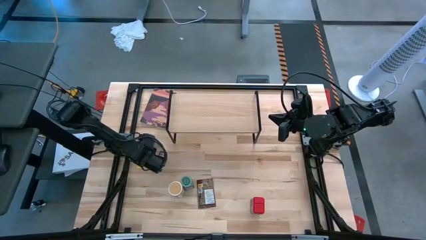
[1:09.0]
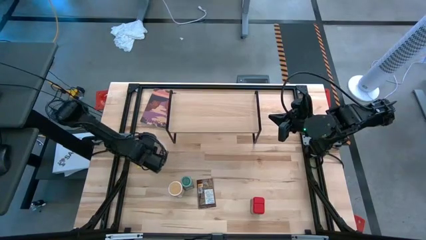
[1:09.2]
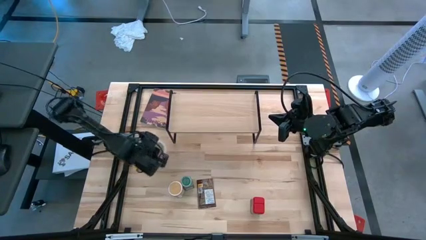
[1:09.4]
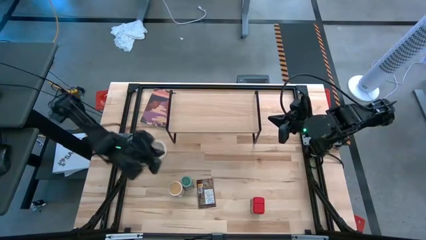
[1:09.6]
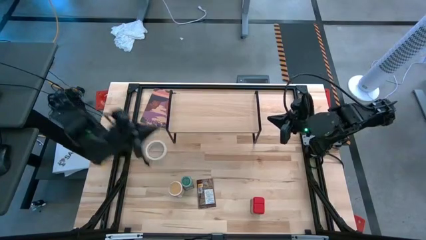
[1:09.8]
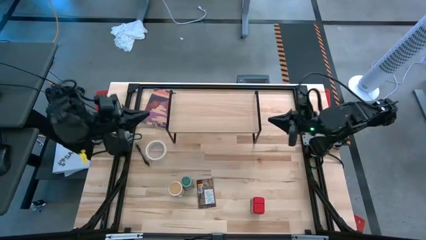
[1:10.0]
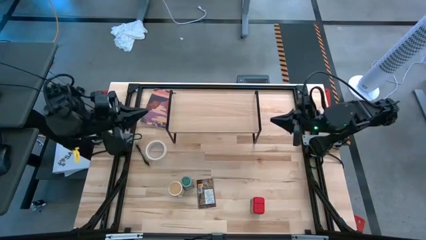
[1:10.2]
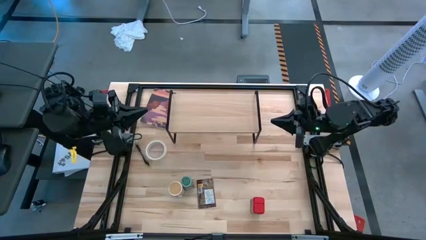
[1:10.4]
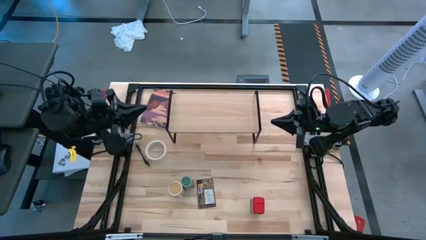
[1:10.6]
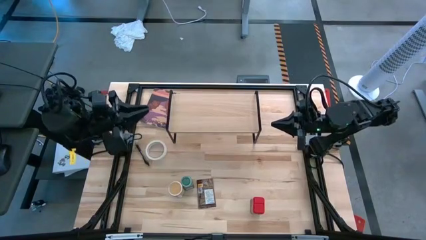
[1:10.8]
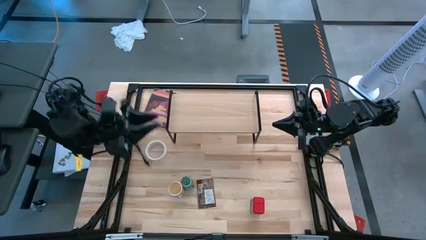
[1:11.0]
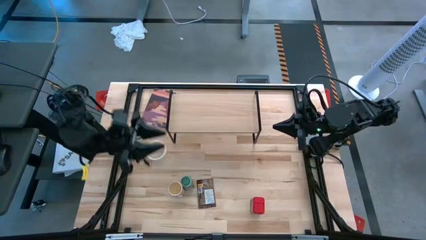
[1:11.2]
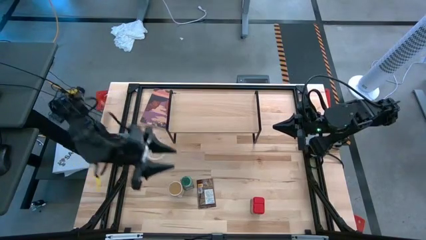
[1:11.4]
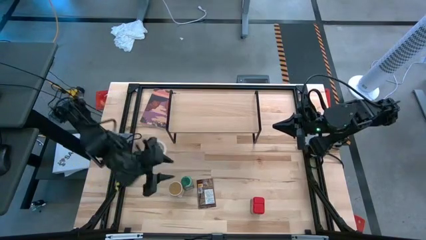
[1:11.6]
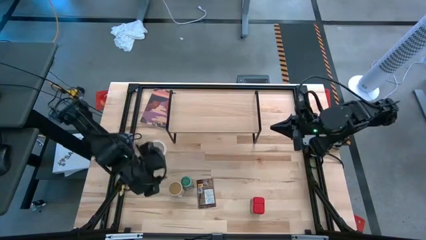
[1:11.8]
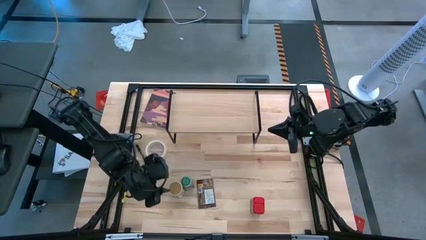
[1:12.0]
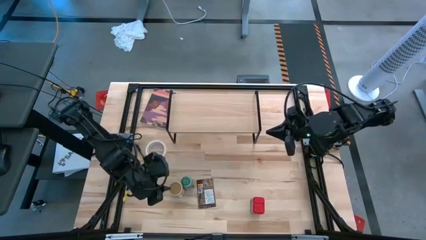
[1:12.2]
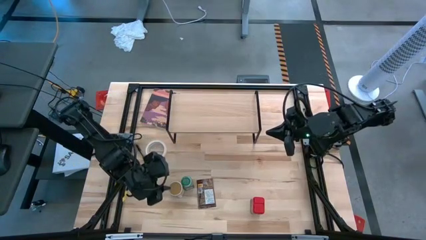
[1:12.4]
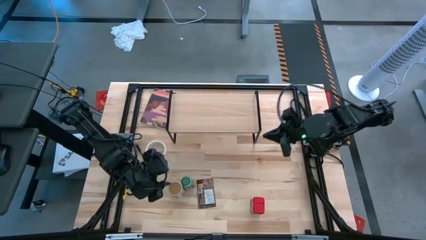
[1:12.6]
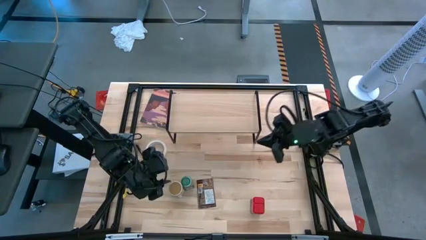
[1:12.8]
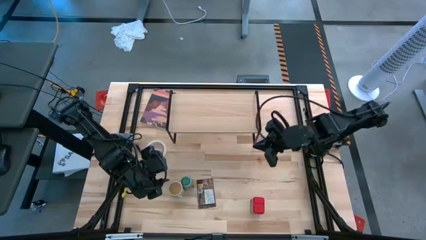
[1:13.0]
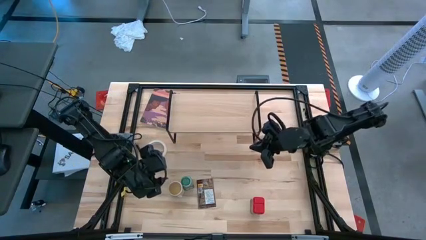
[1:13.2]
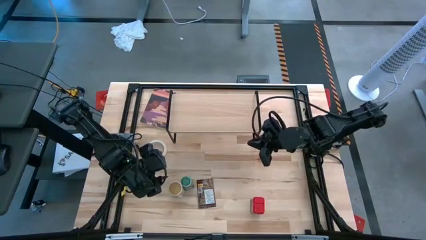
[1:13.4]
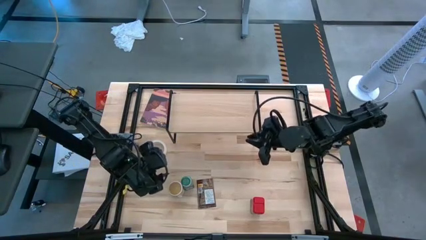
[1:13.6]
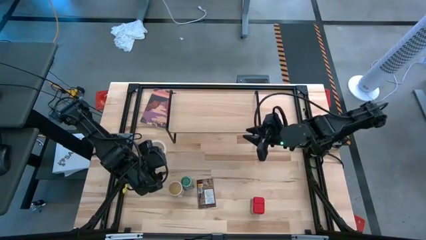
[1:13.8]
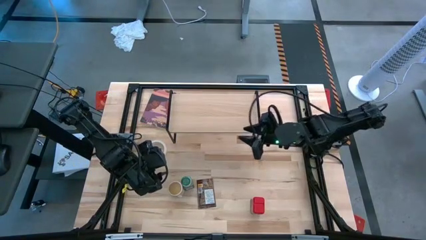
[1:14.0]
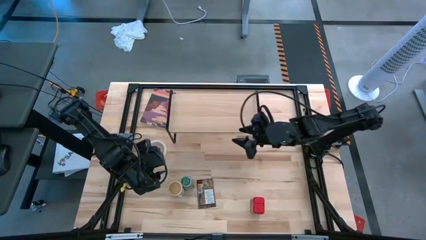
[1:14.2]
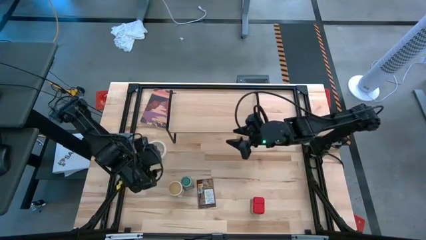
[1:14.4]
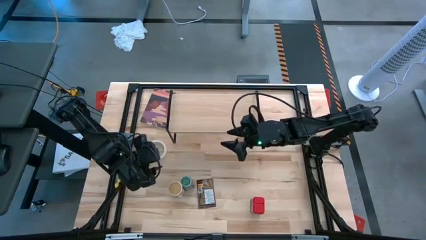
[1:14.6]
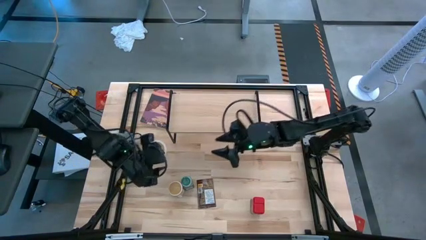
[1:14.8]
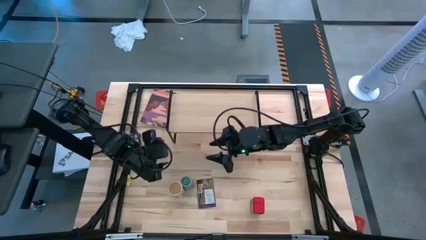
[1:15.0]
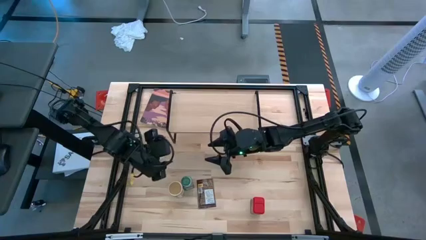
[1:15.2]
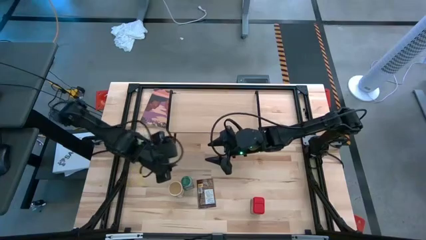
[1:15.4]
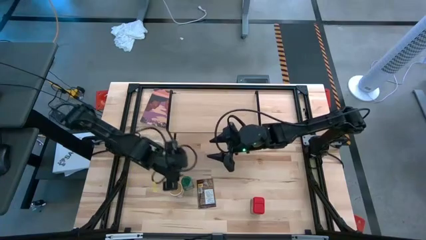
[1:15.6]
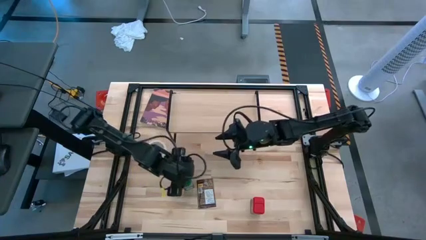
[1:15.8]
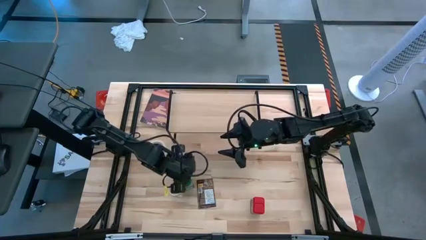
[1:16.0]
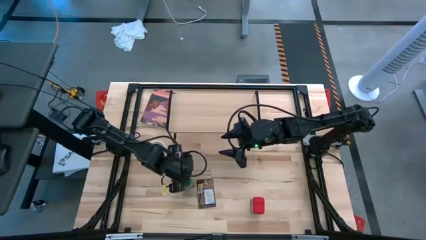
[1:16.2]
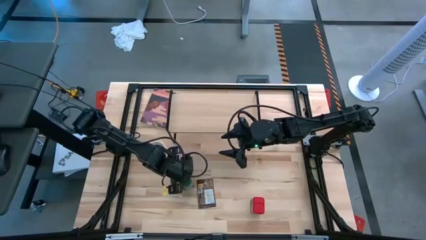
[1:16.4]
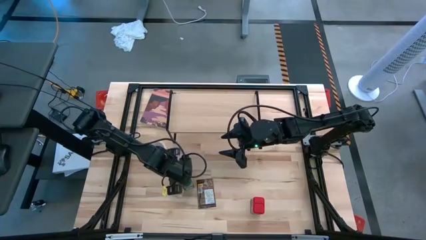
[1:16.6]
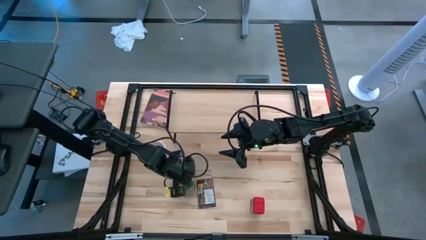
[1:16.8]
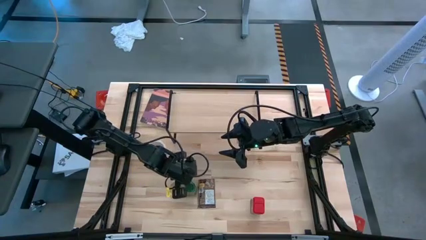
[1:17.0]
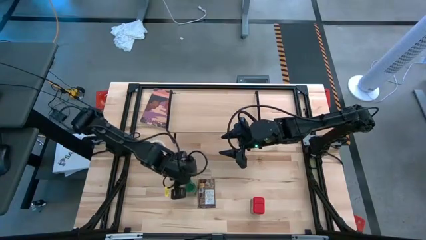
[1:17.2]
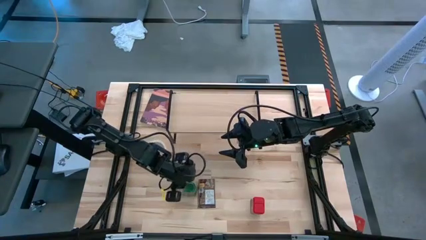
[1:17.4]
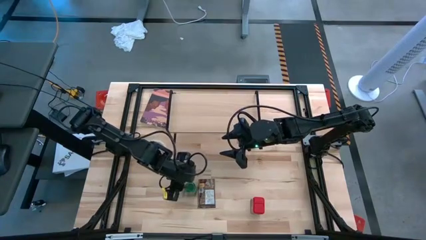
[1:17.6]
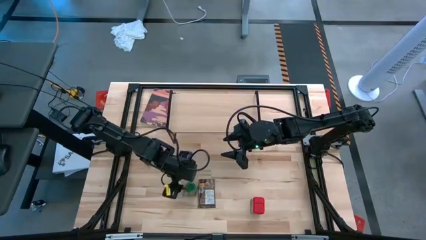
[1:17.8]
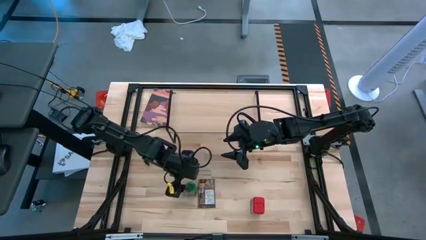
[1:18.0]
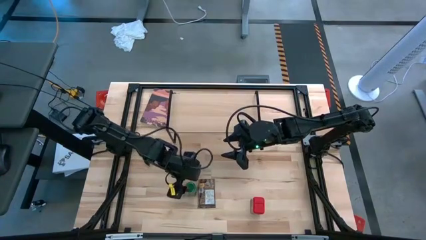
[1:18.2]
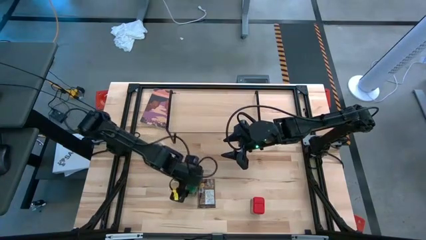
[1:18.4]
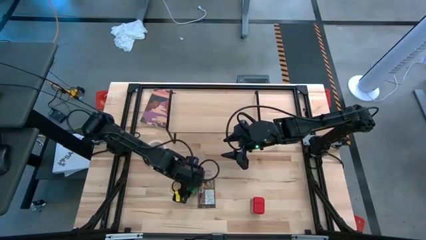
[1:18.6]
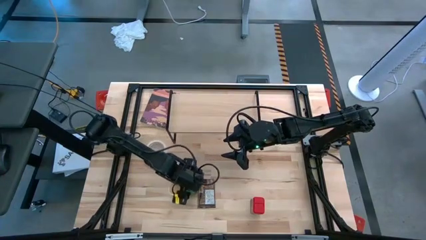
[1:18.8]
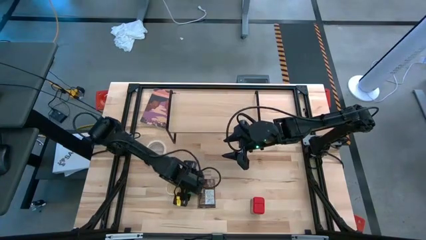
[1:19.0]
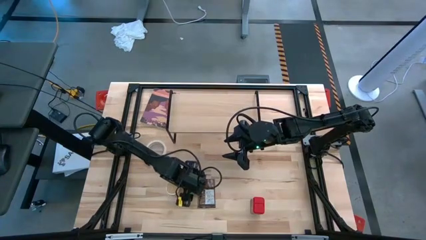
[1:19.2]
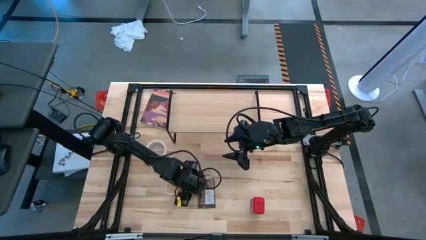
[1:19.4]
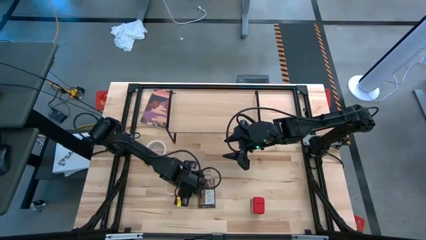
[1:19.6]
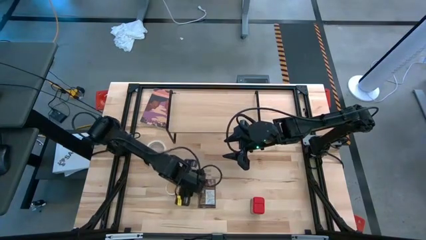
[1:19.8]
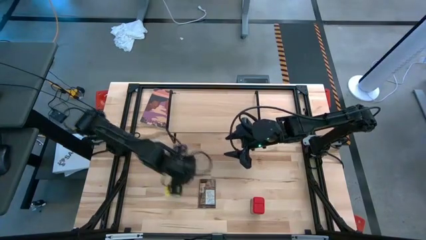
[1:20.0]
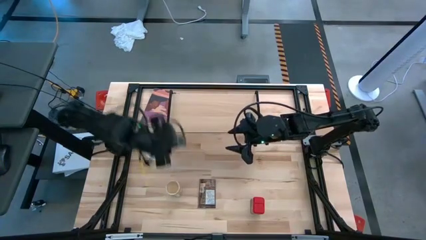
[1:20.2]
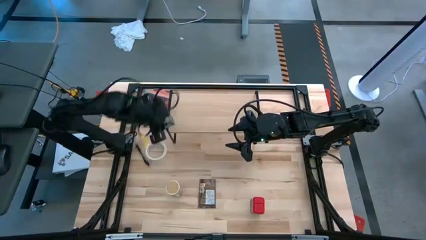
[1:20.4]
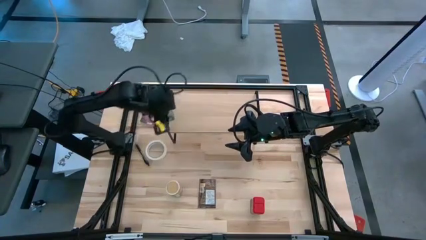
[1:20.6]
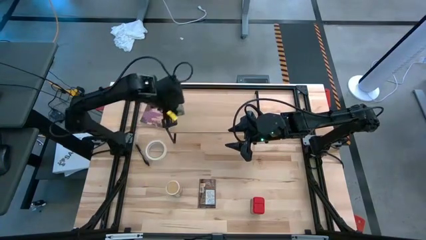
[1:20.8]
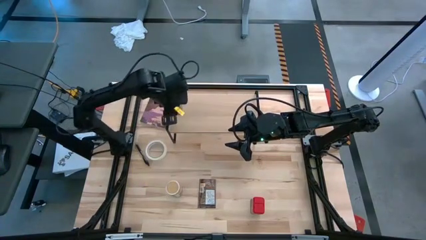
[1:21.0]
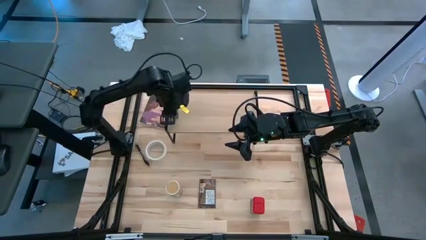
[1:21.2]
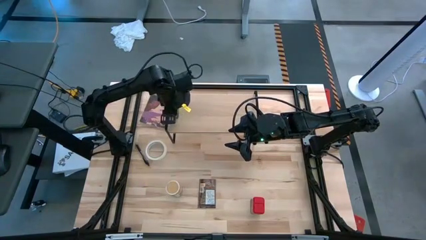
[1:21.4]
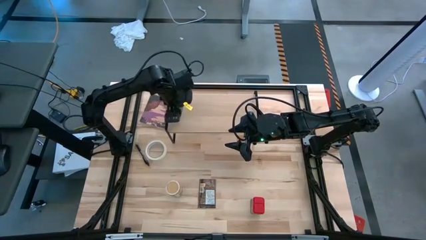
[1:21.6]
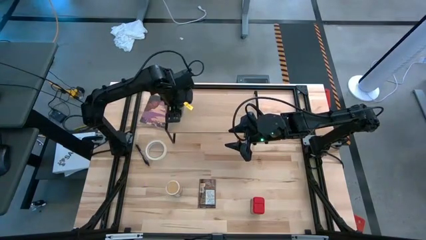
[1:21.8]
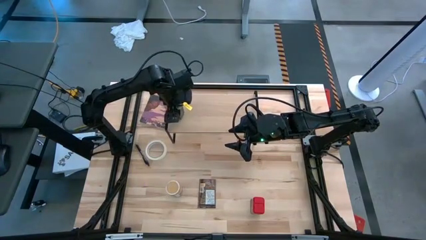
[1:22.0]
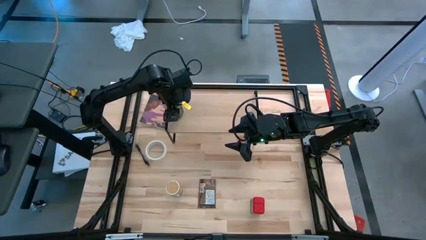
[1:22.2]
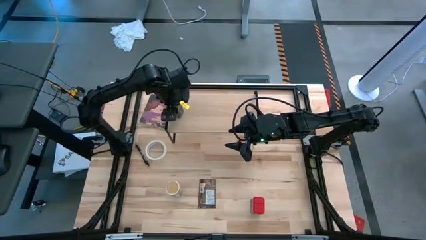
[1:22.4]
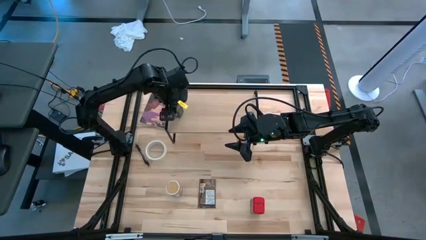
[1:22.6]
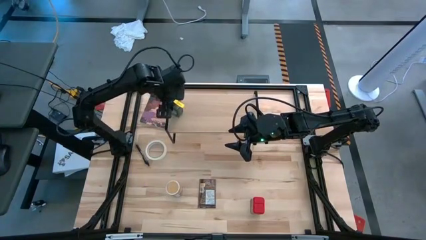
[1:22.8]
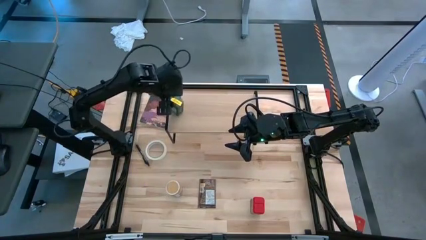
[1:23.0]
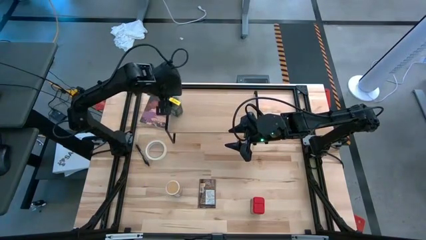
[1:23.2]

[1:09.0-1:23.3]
Task: Shelf spices
Put the green seasoning bottle on the shelf

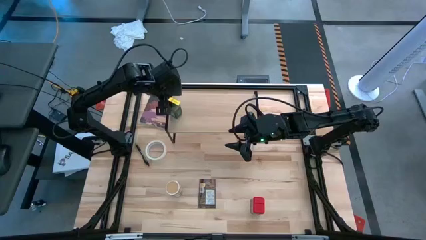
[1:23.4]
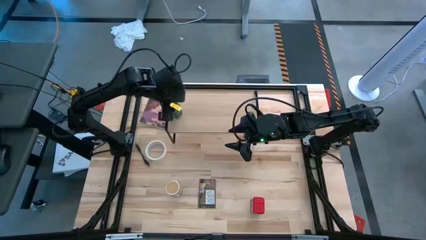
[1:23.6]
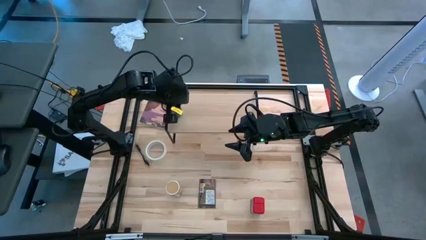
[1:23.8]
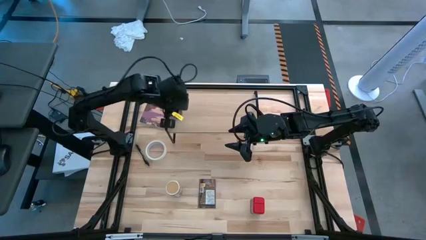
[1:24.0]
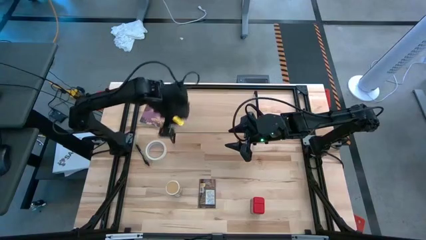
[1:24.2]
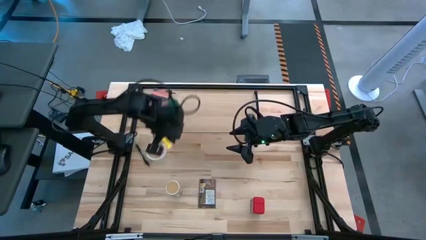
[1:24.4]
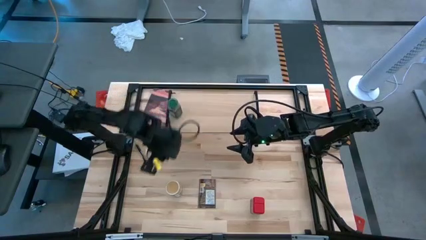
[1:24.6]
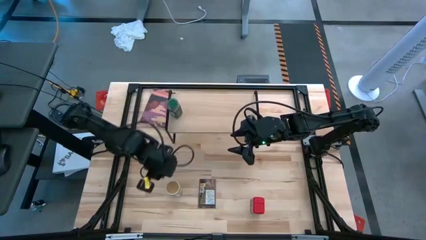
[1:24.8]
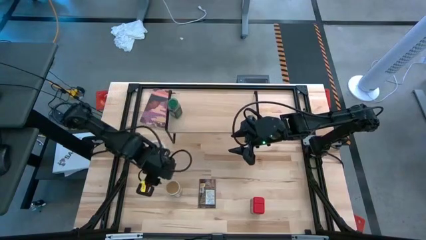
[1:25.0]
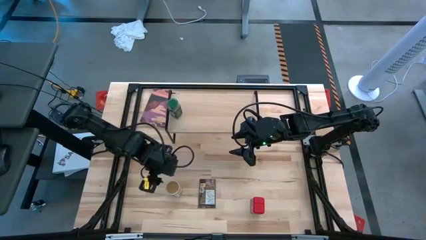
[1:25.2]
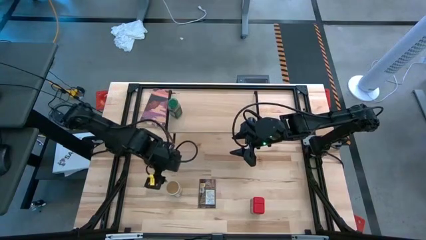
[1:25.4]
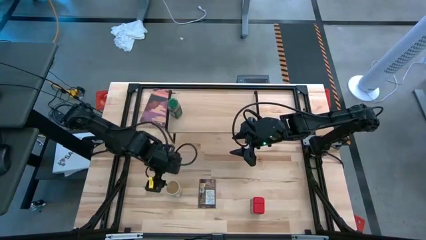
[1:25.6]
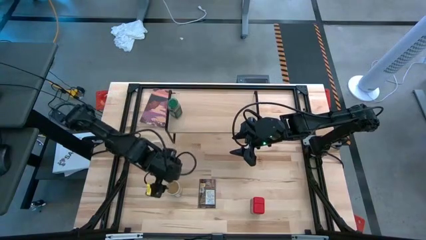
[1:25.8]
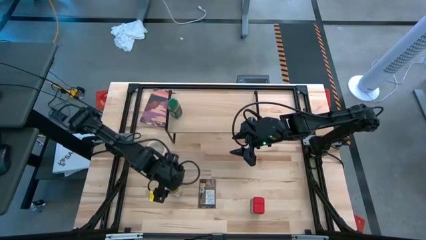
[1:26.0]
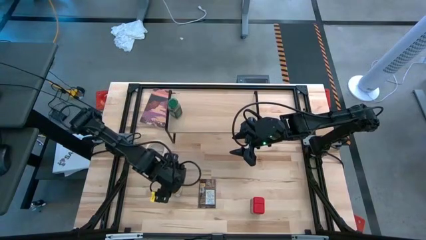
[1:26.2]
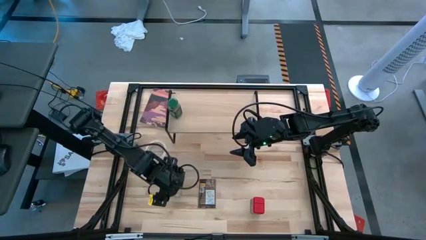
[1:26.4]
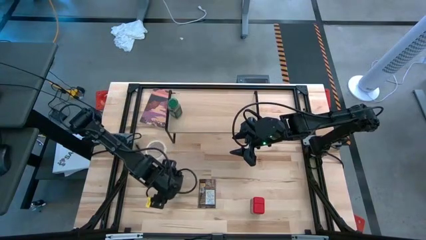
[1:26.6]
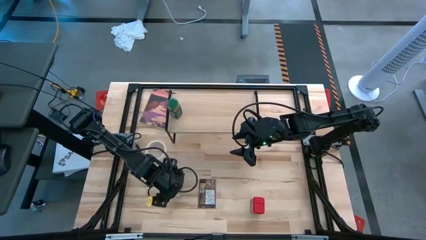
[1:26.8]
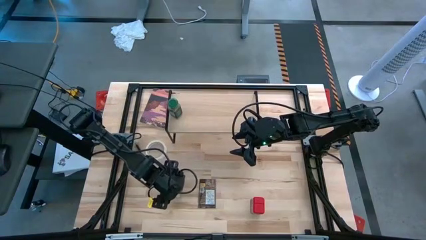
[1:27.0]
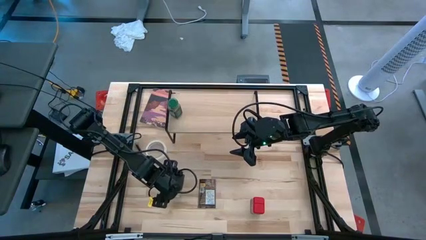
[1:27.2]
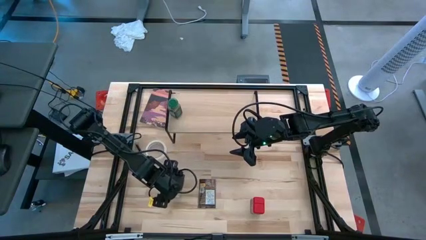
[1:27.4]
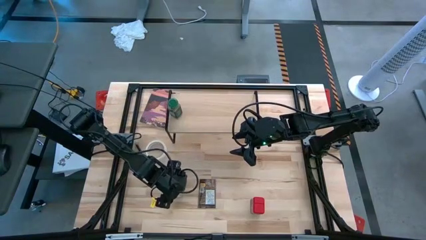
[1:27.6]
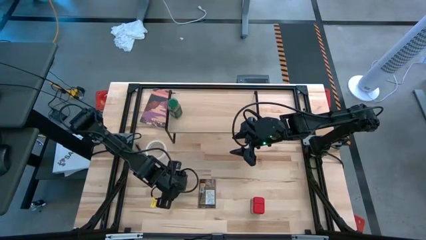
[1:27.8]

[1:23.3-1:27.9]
Put the brown seasoning bottle on the shelf
